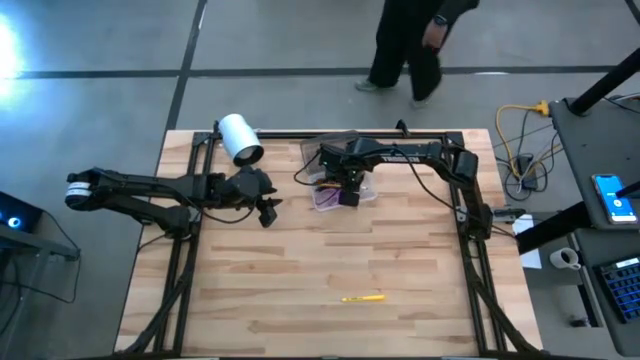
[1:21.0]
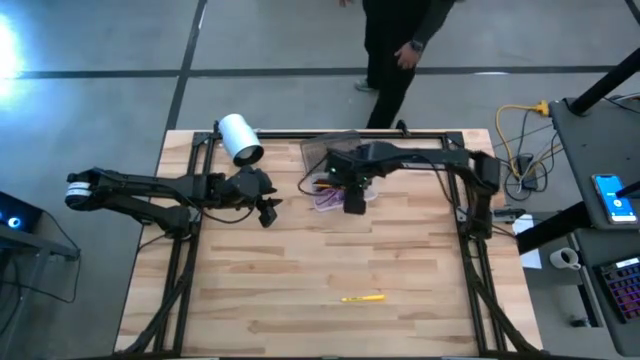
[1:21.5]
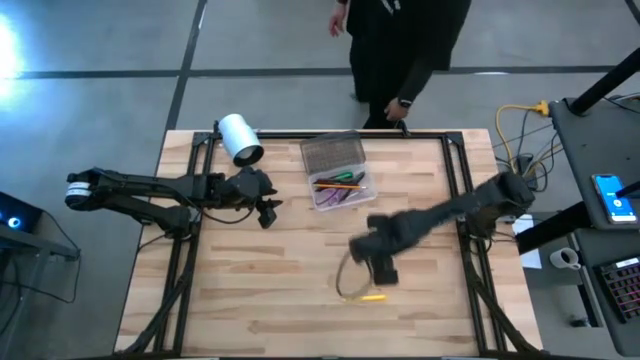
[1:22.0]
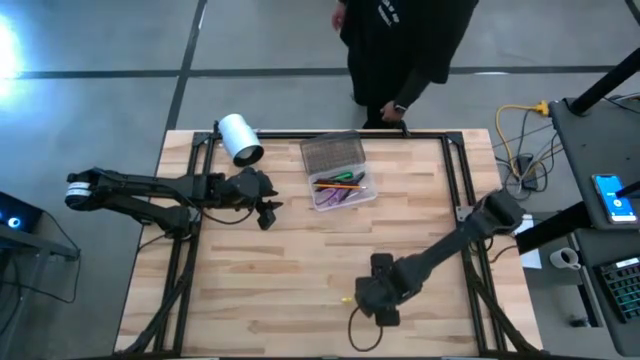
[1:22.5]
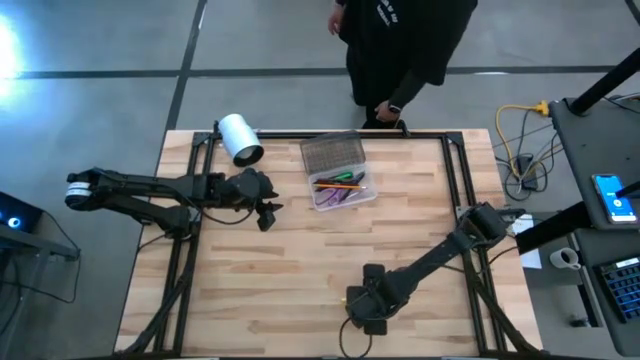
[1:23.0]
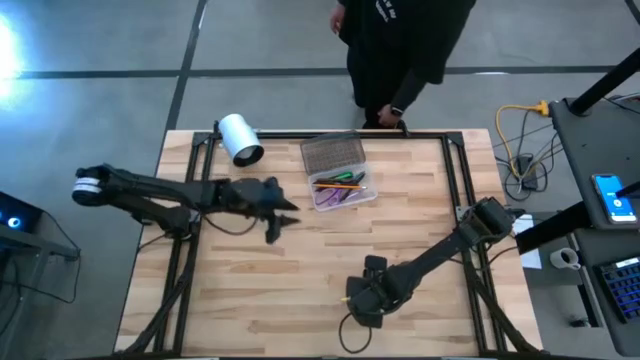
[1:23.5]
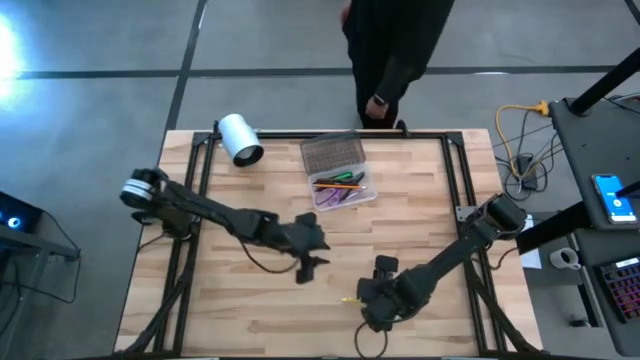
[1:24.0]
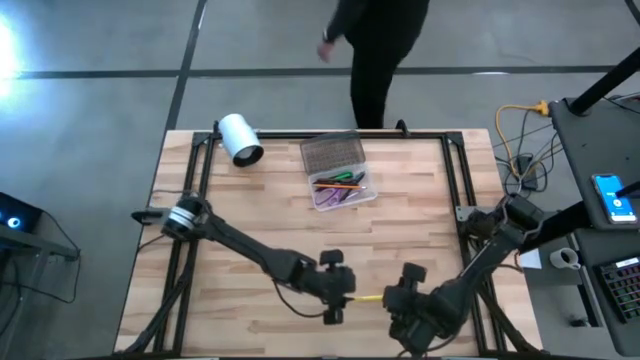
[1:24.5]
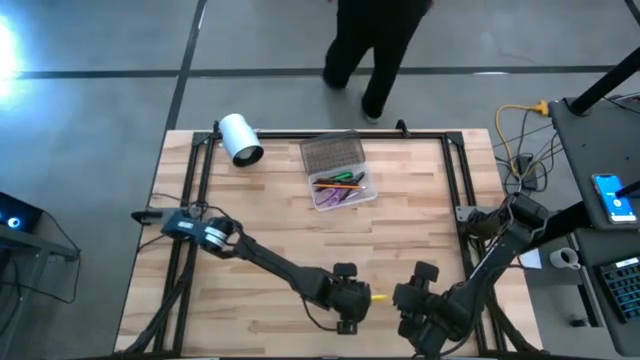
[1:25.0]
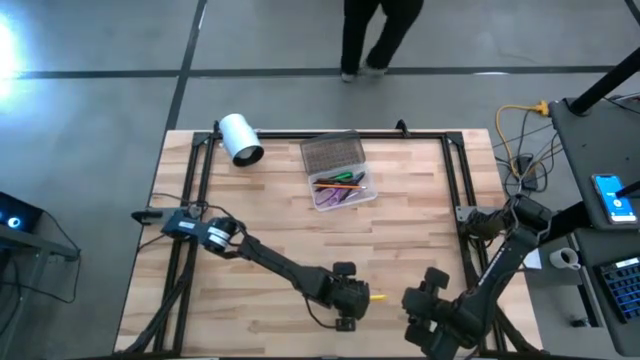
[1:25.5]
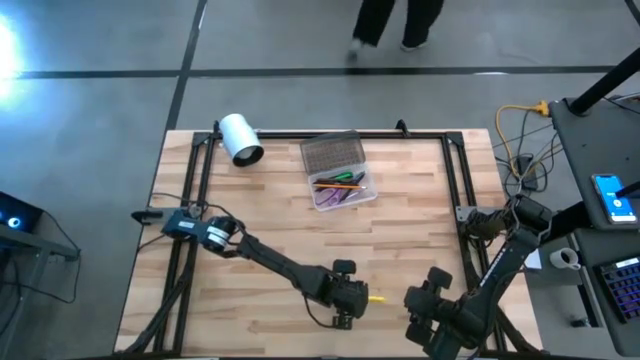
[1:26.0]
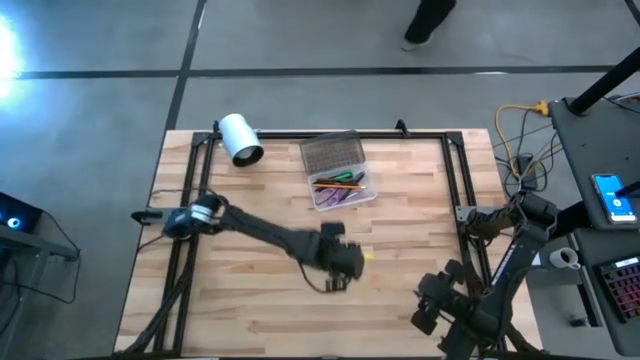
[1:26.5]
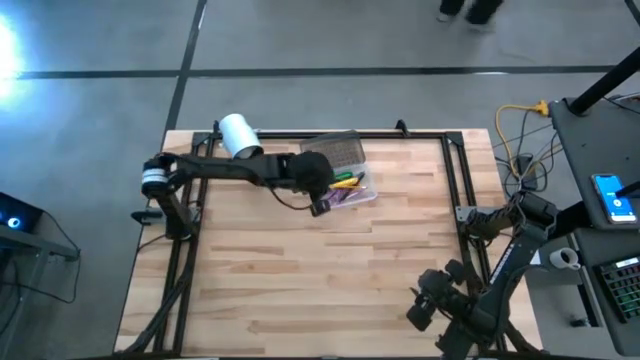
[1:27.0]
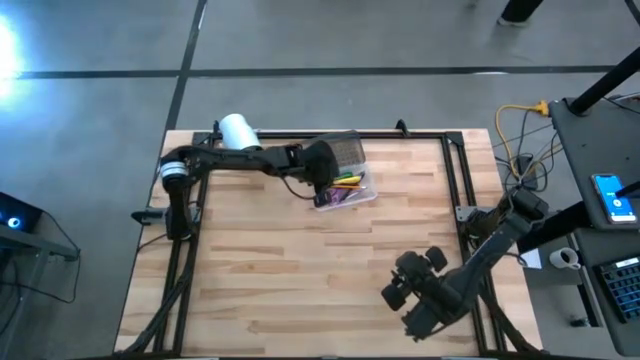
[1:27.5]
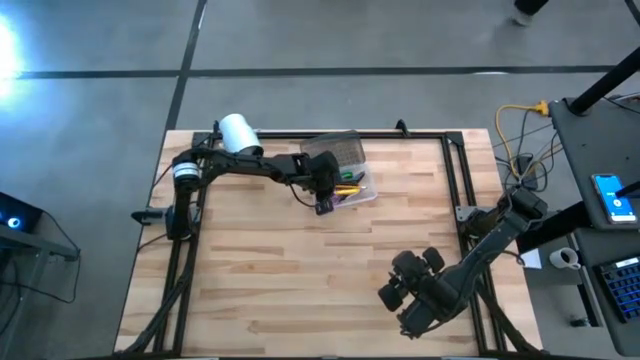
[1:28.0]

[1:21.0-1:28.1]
Task: Pick & place school supplies into a supply box
Put the yellow pen into the supply box

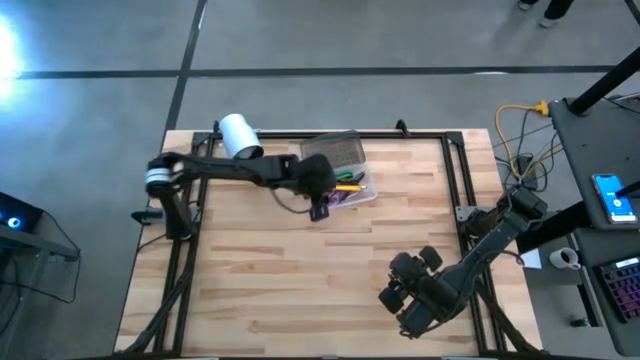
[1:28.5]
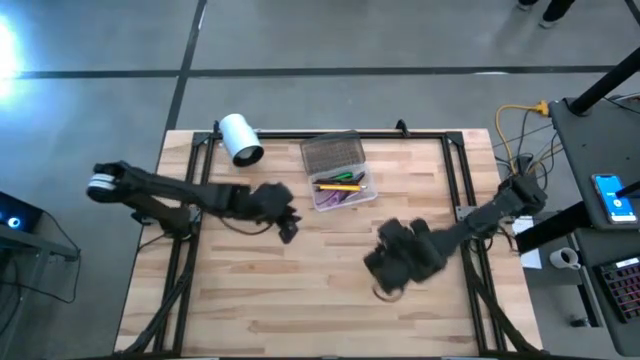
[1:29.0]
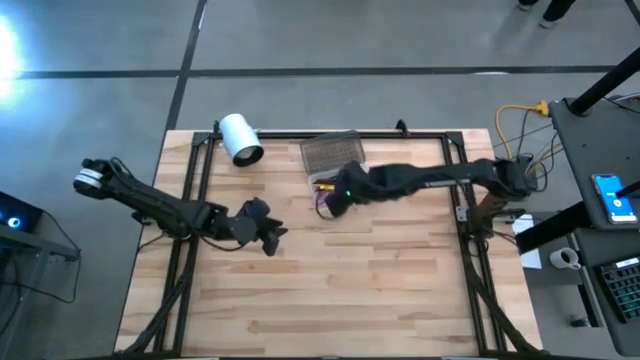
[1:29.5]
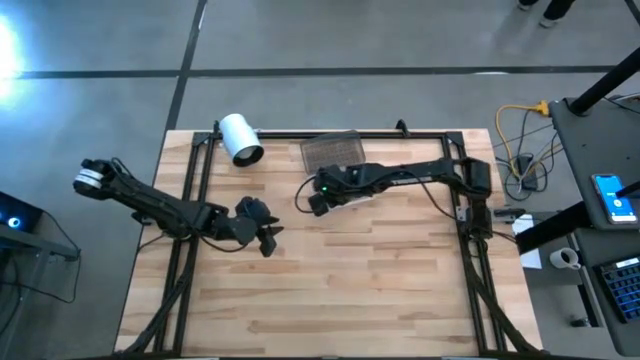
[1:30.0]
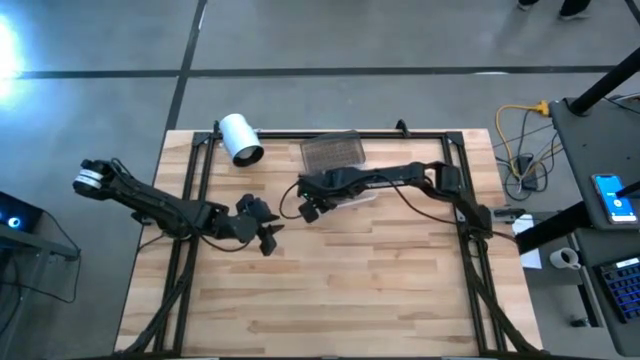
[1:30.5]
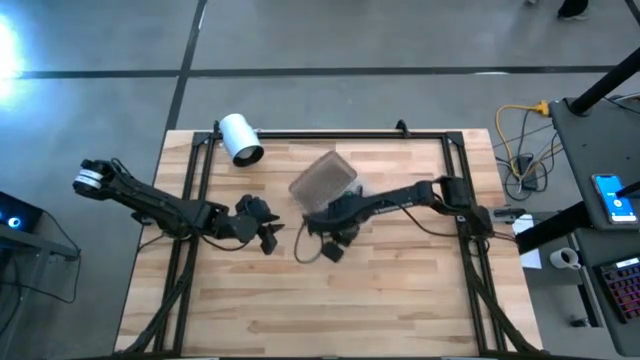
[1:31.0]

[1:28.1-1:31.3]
Move the supply box to the center of the table

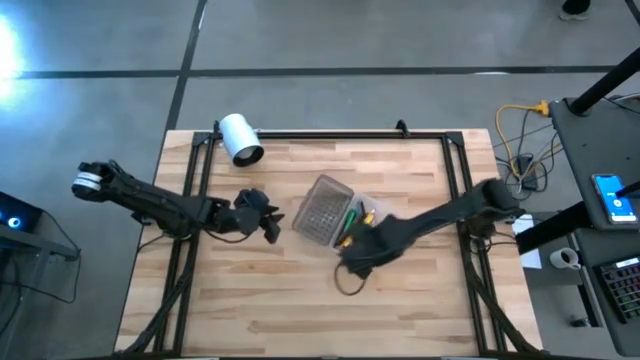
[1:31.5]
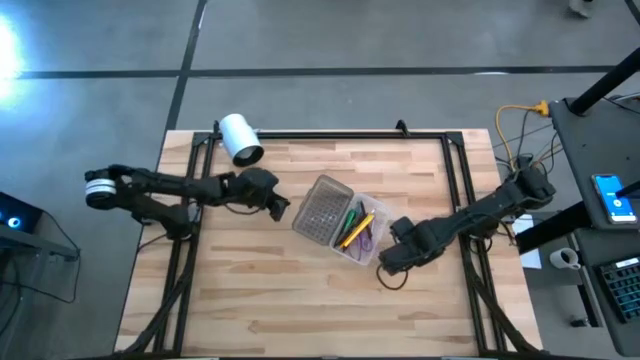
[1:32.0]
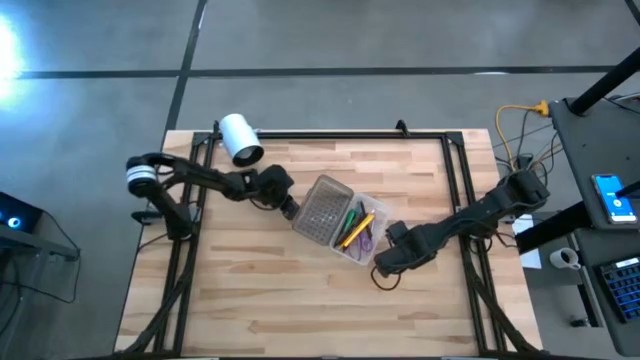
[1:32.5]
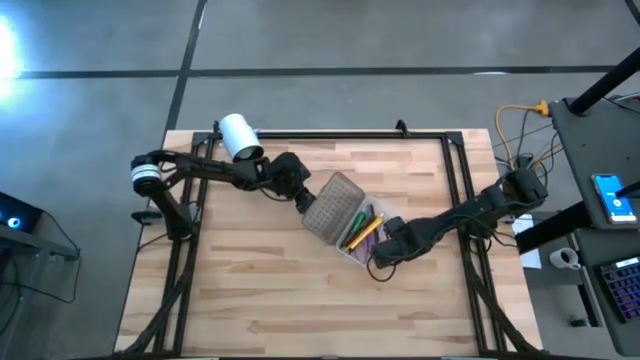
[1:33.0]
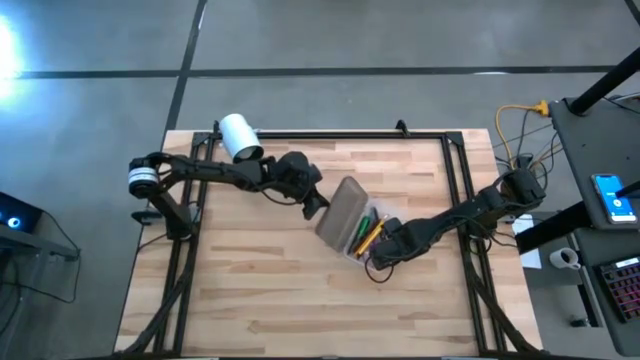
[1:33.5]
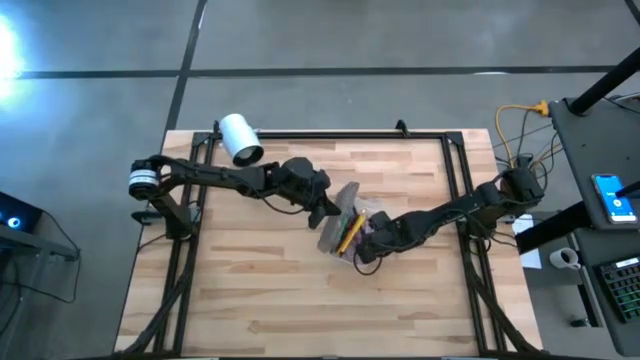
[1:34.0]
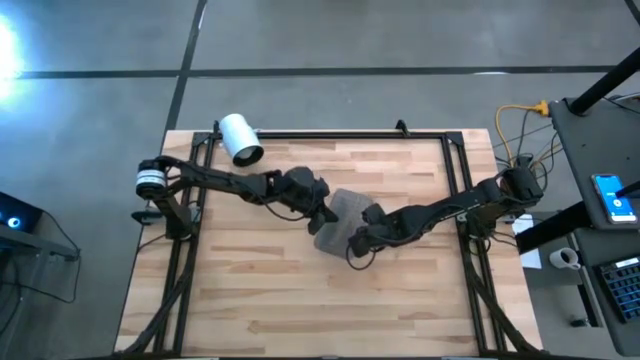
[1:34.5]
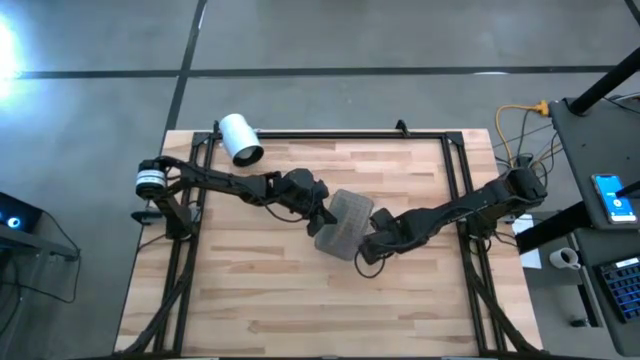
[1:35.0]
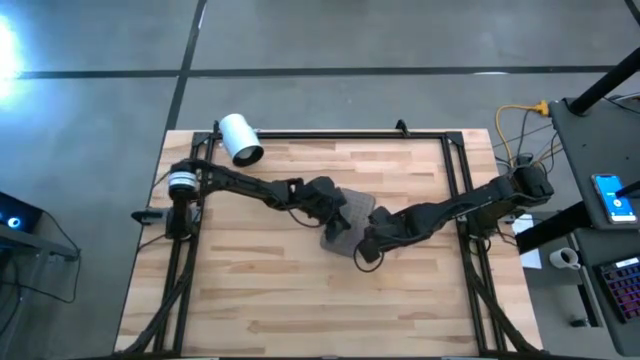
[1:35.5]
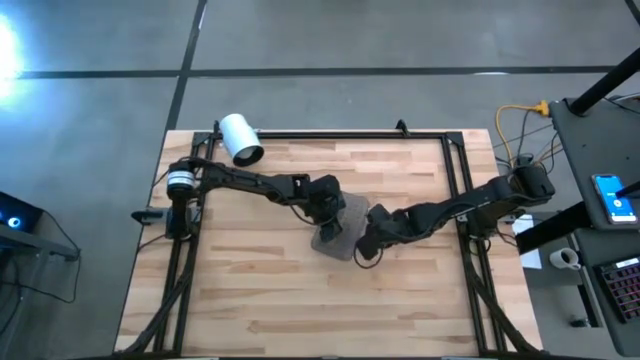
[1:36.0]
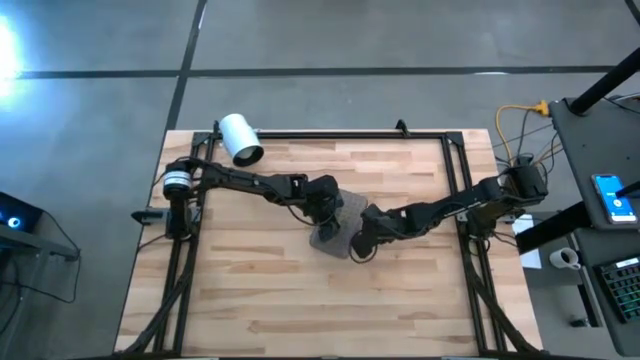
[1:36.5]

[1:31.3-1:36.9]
Close the supply box

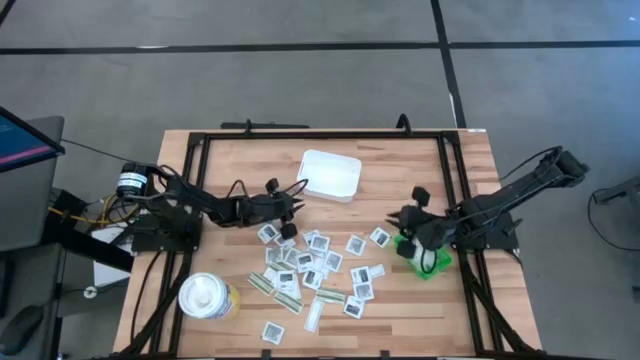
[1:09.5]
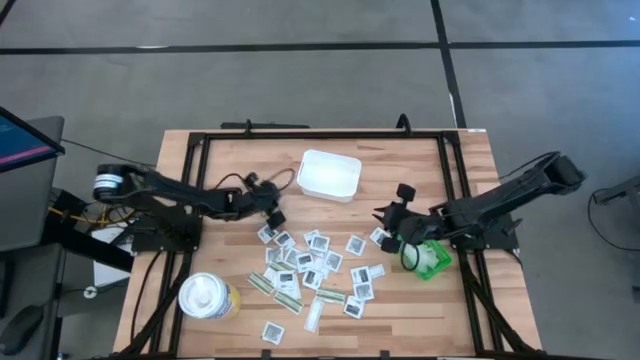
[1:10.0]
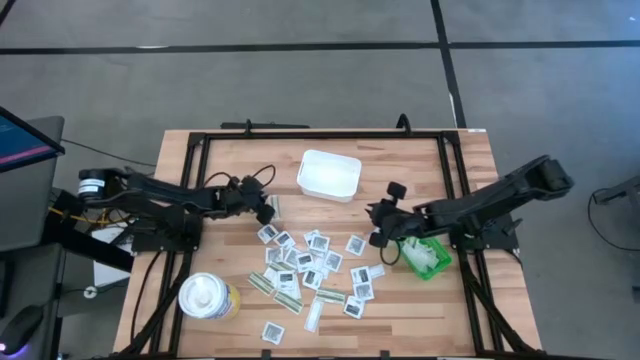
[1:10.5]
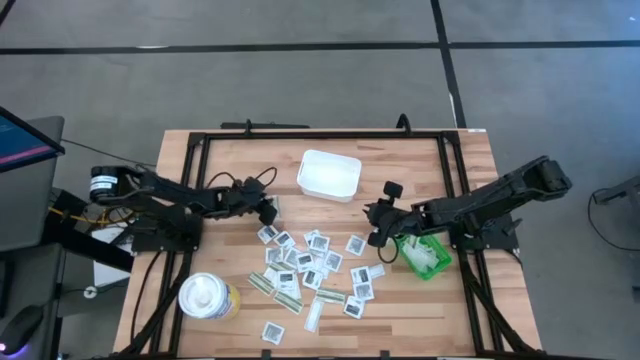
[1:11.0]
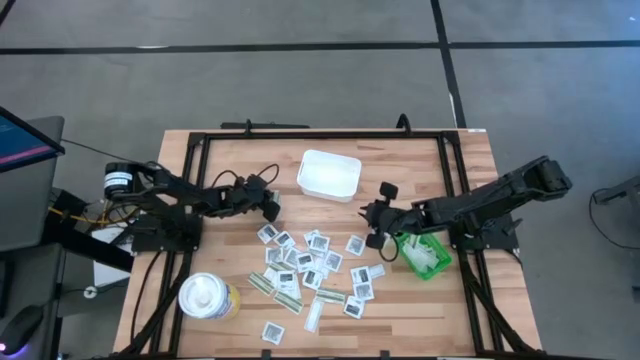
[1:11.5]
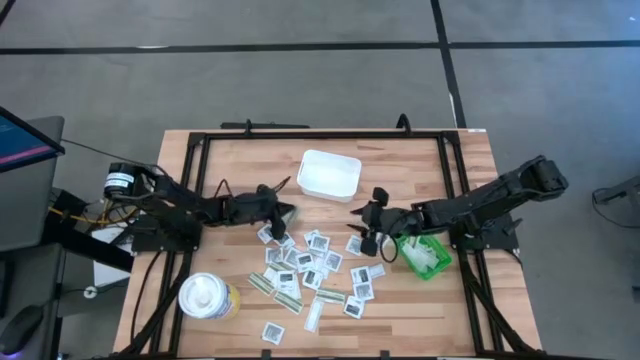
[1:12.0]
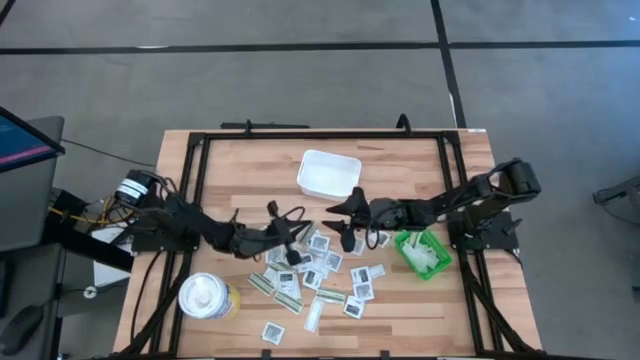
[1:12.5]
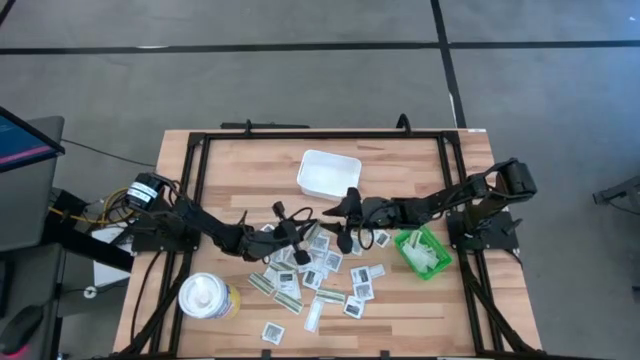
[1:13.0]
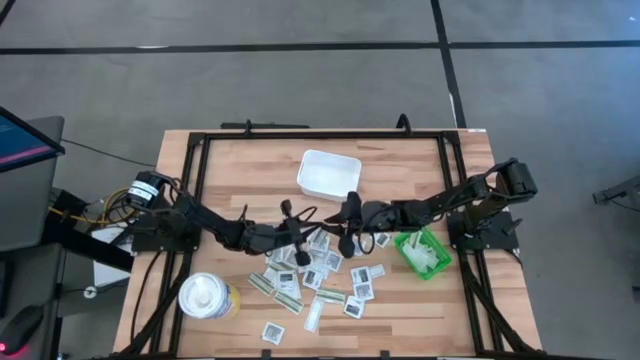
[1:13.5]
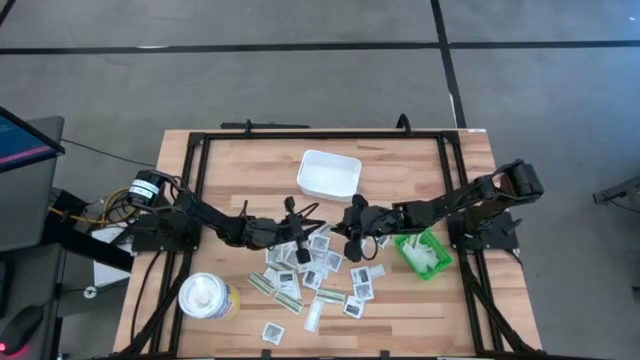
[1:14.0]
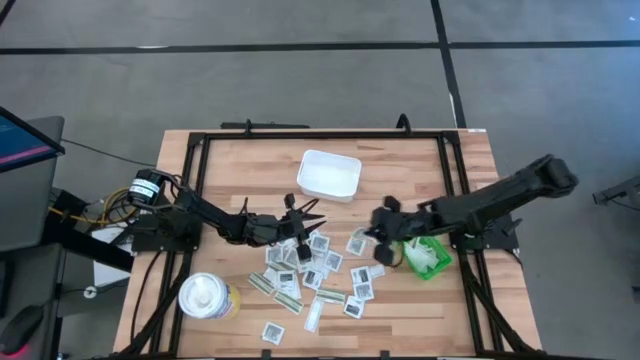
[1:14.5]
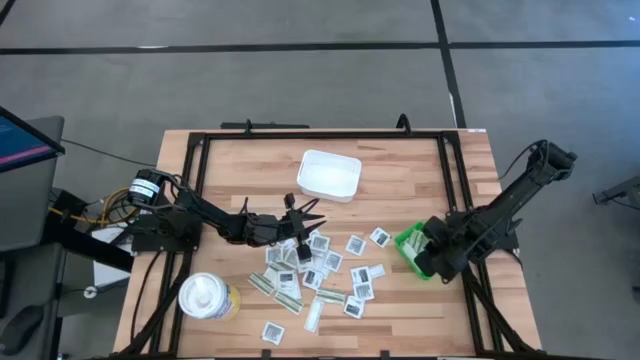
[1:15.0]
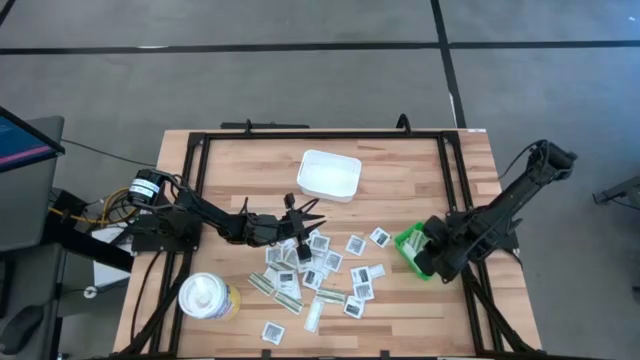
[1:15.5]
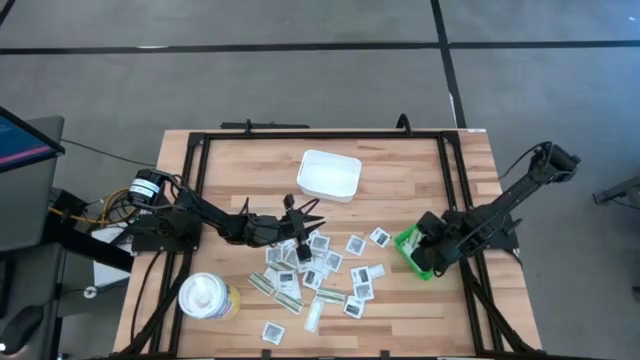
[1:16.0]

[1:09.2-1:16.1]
Task: Pick & Place First Aid Supplies
Put the bandage pack into the green bin
